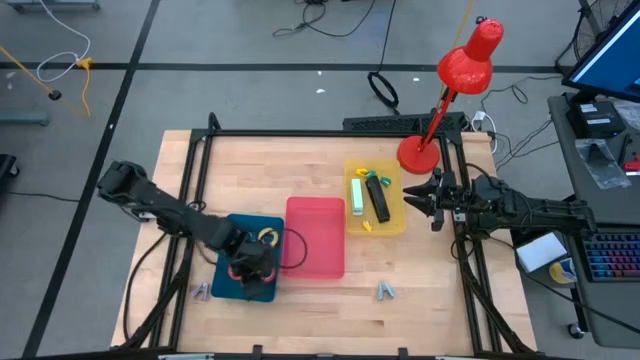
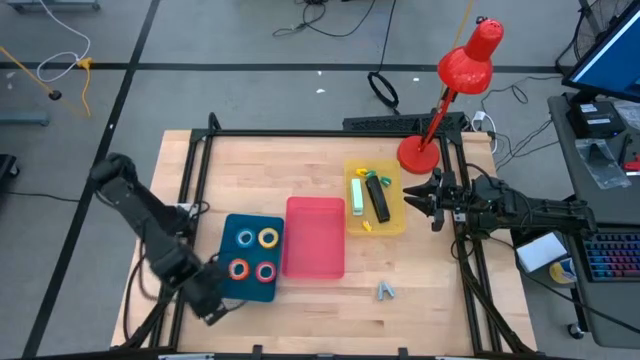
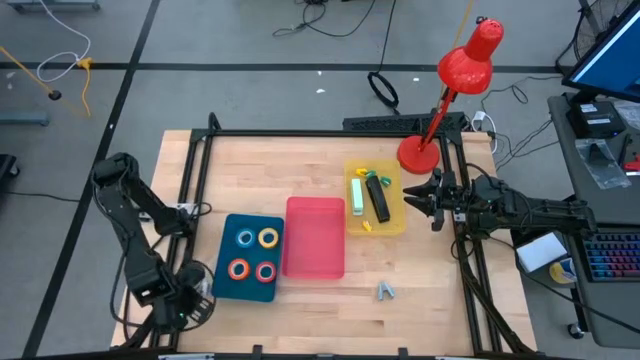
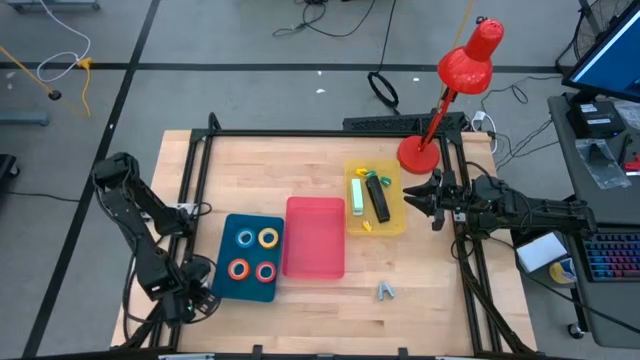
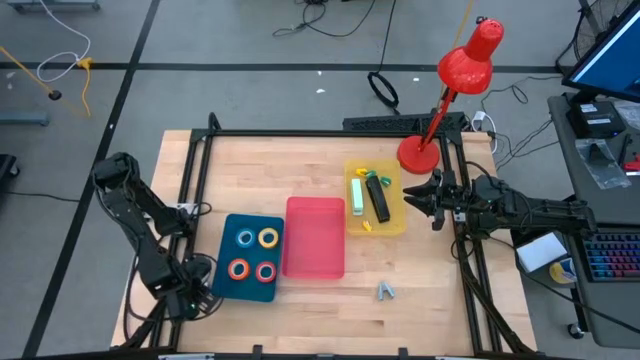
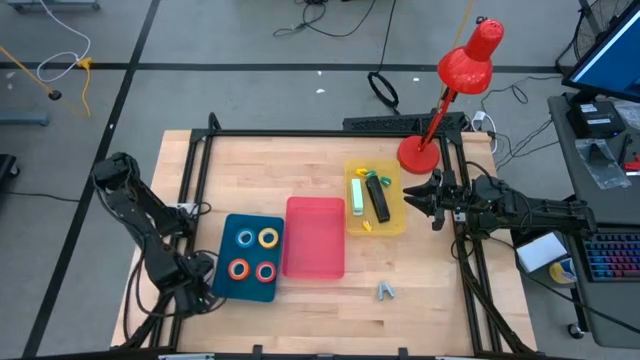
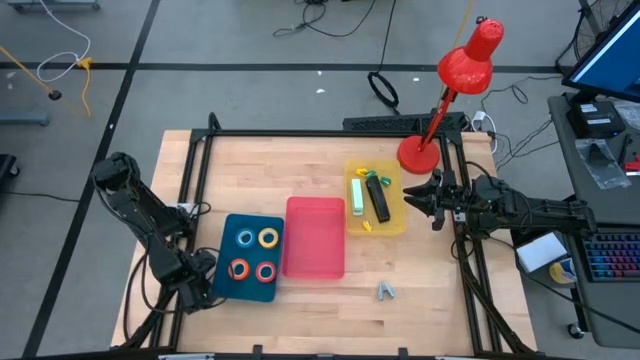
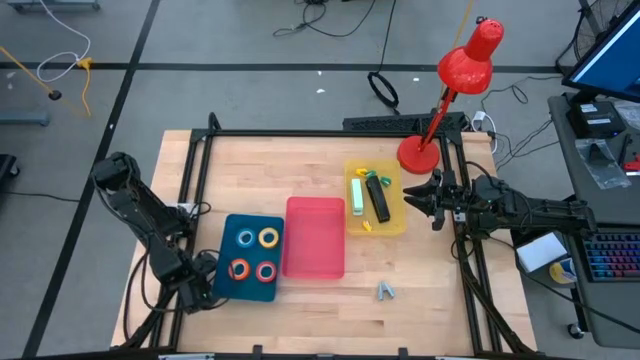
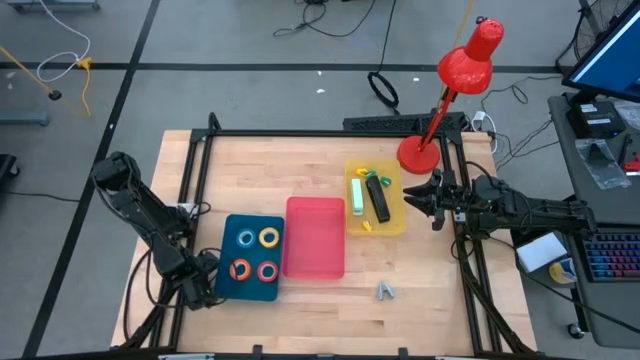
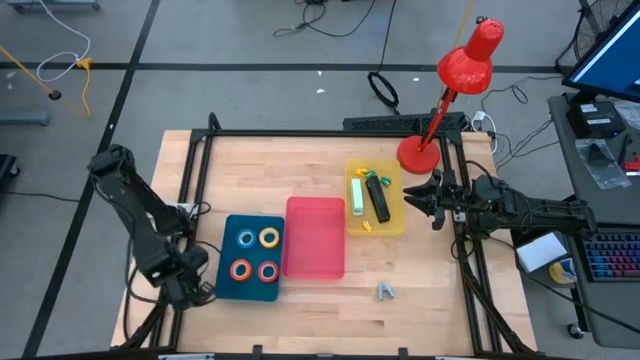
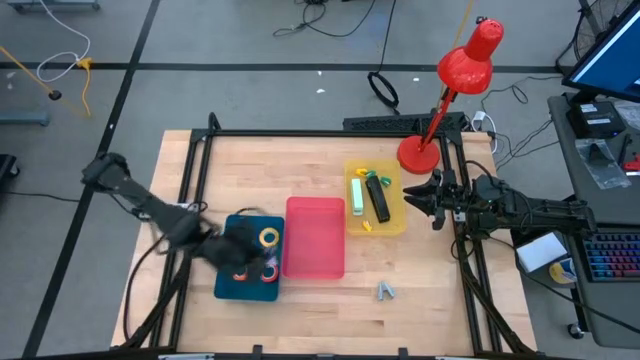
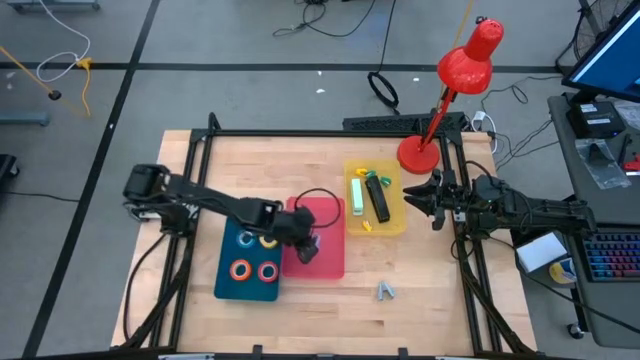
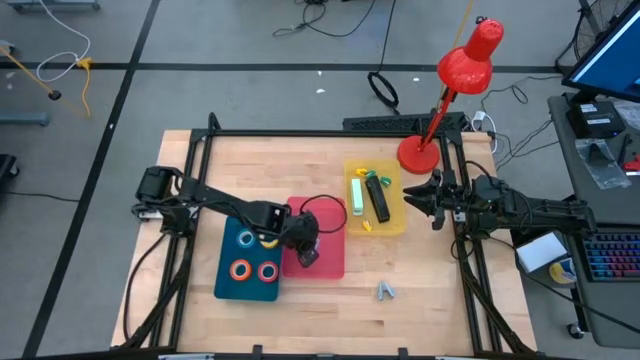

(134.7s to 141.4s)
Task: Pick and place Stapler, Stapler remover, tape
Put the violet staple remover into the red bin

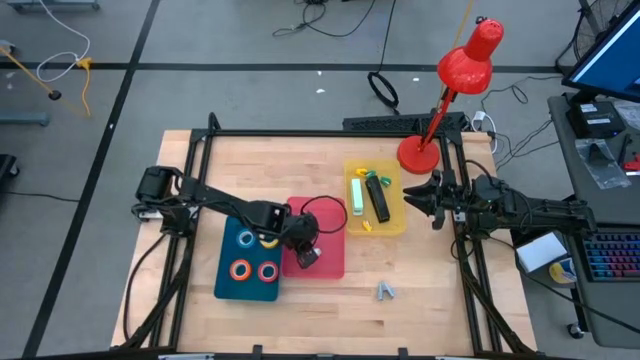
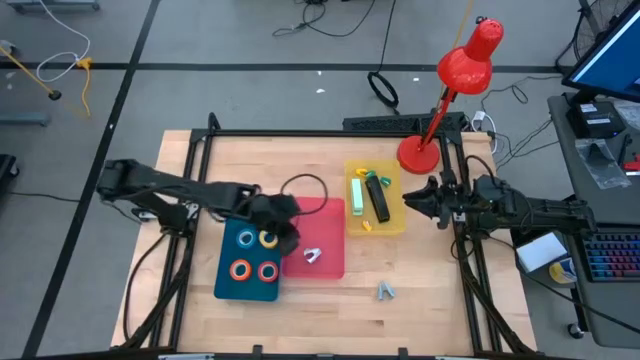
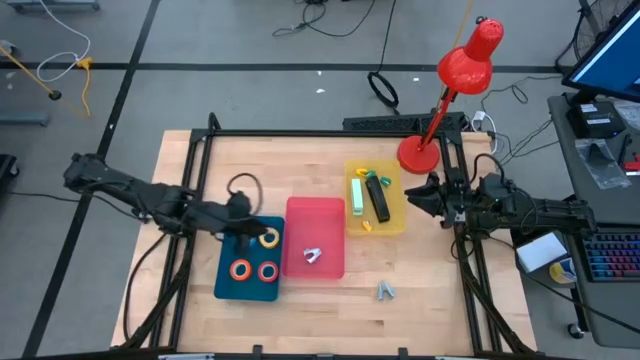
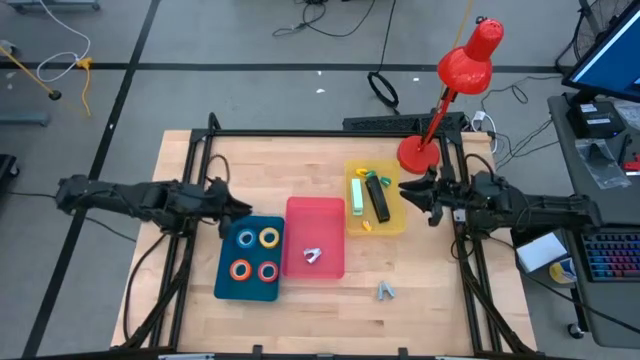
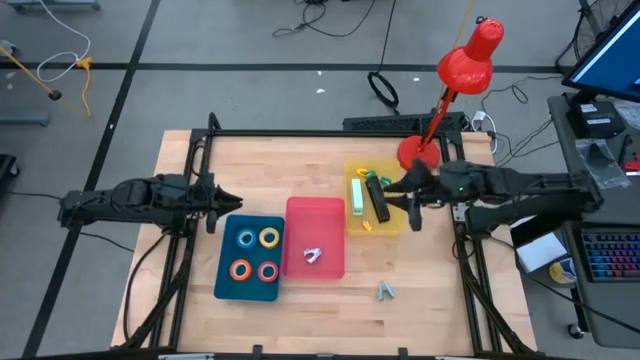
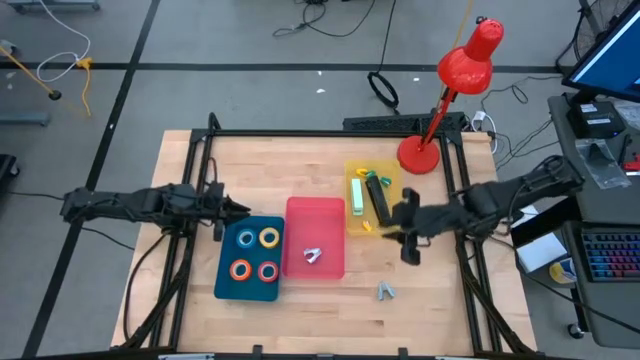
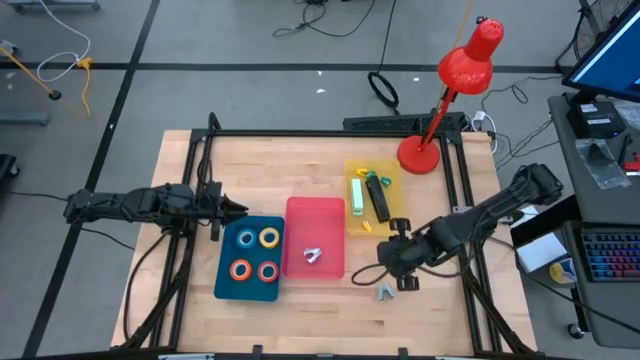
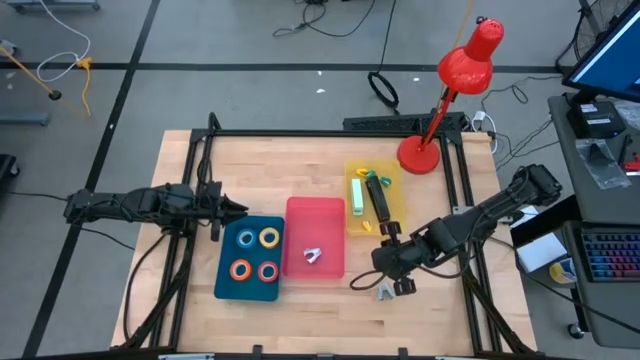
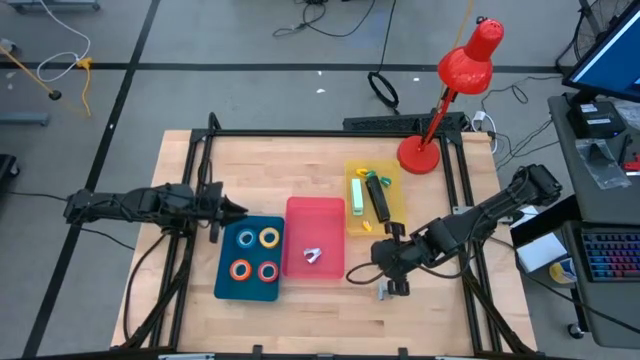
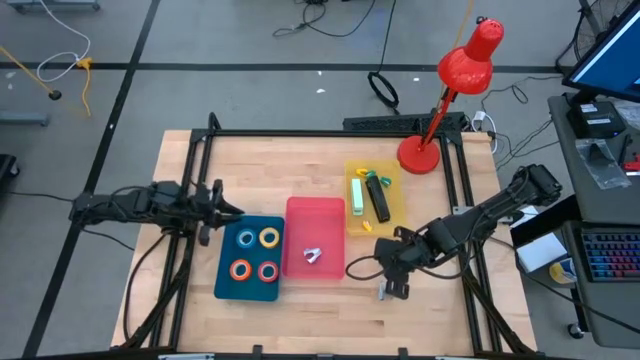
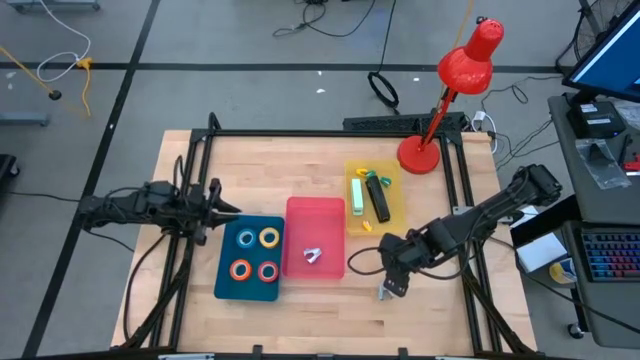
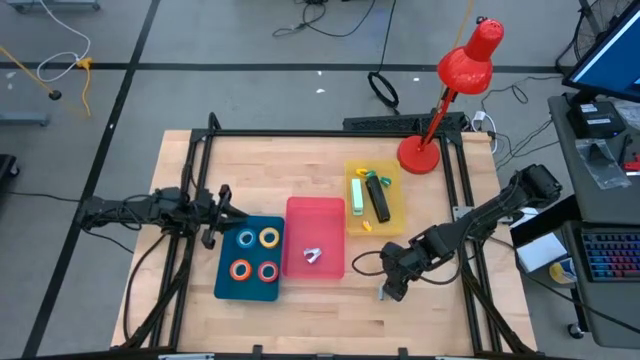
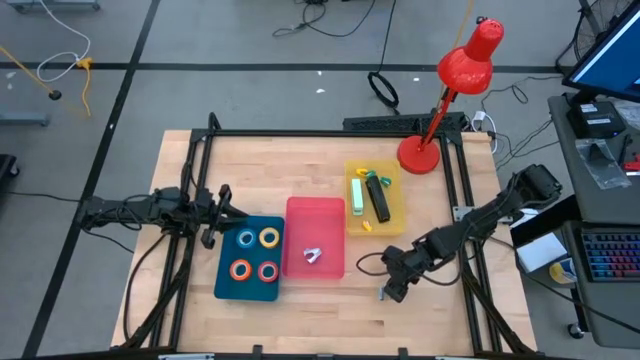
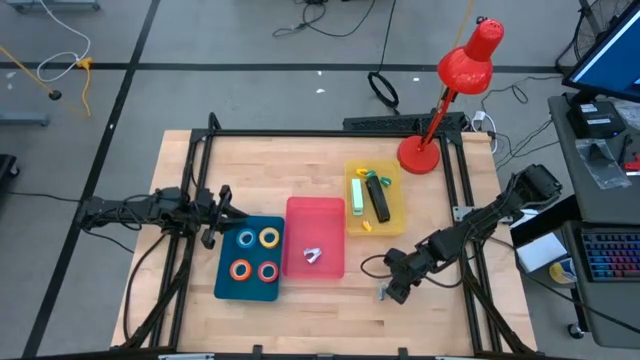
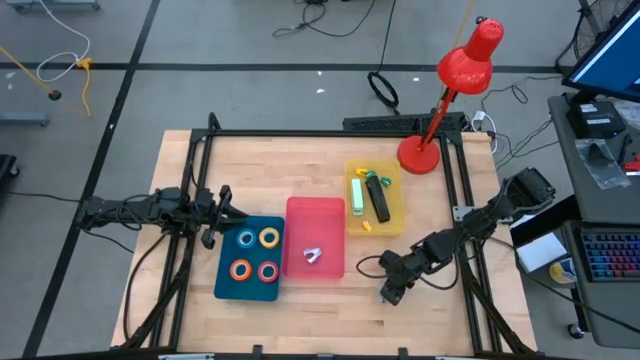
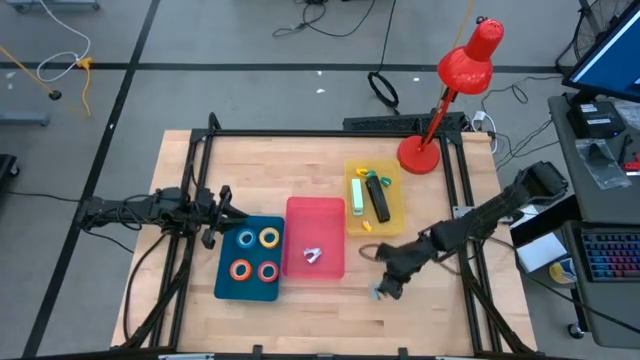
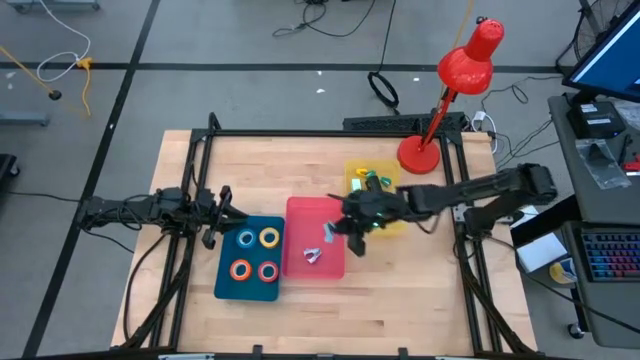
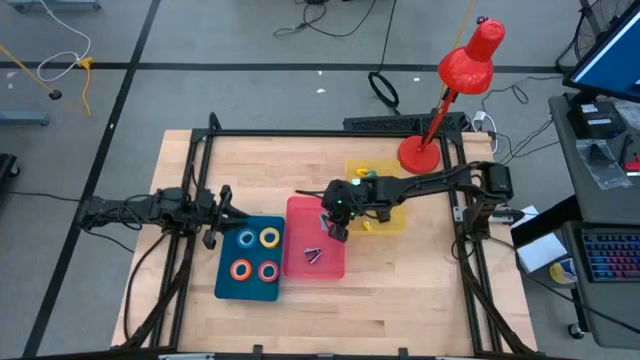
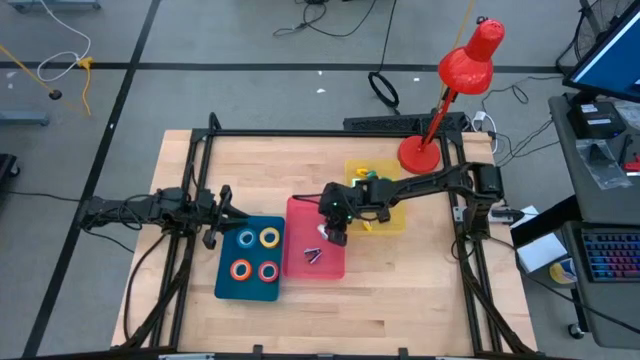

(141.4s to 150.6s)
Put the blue staple remover into the red bin

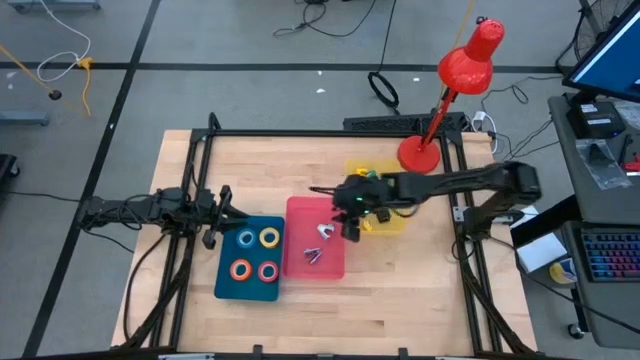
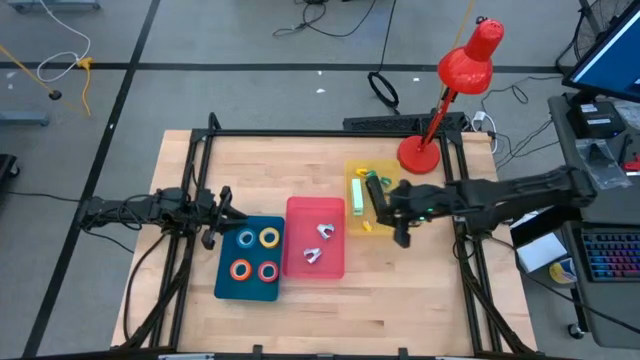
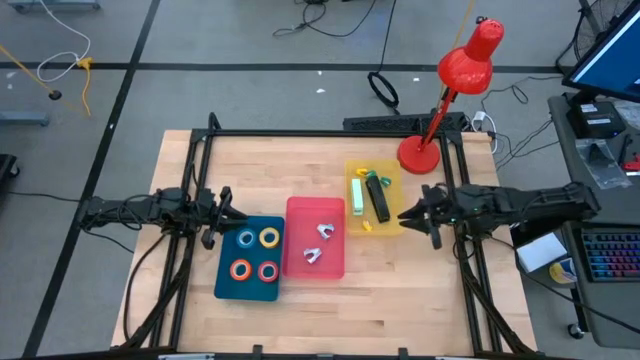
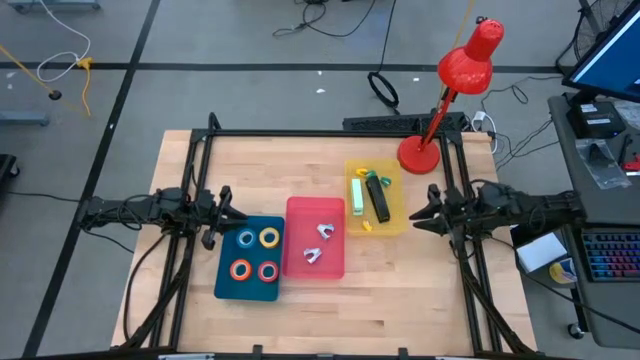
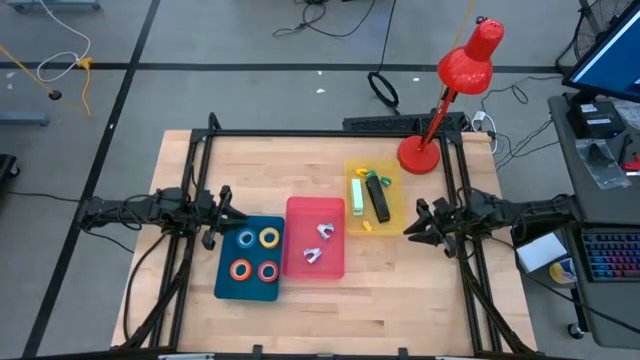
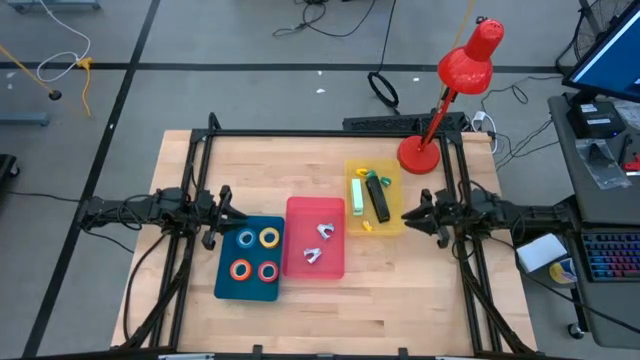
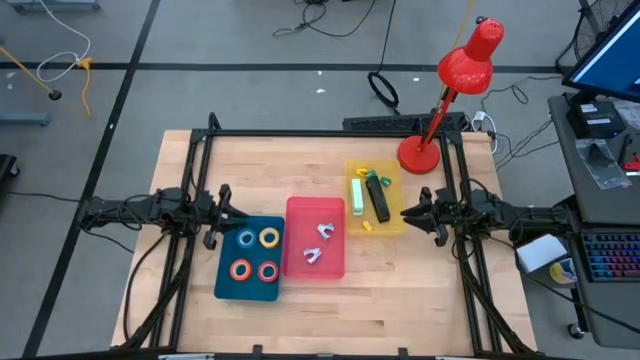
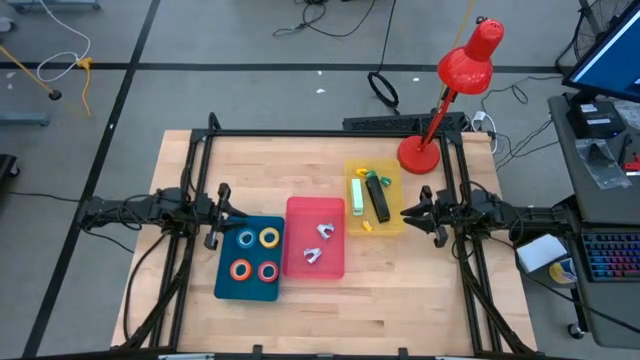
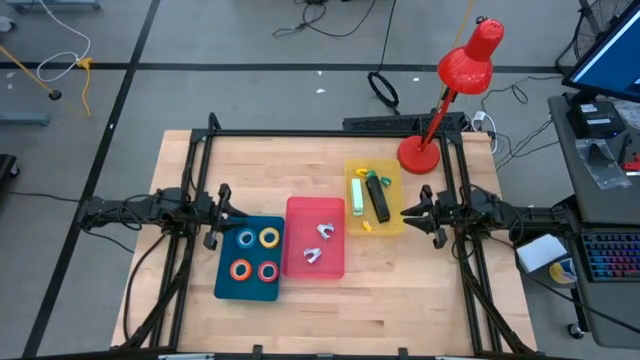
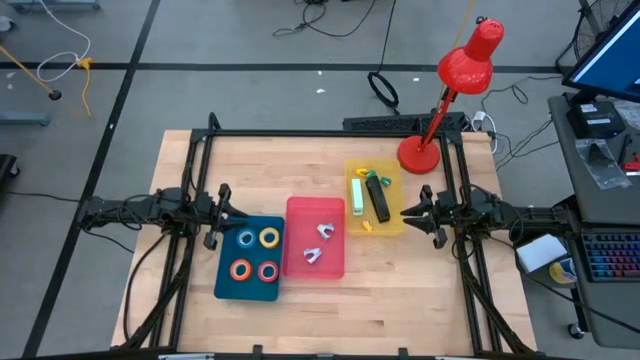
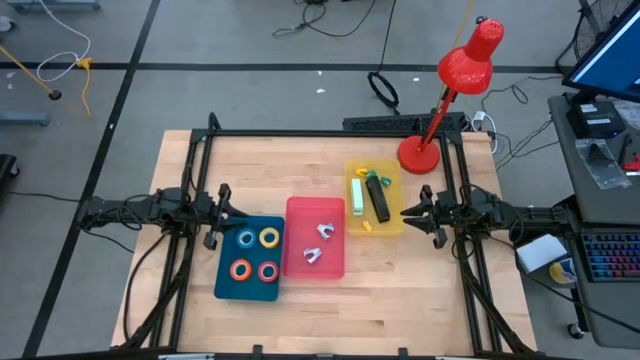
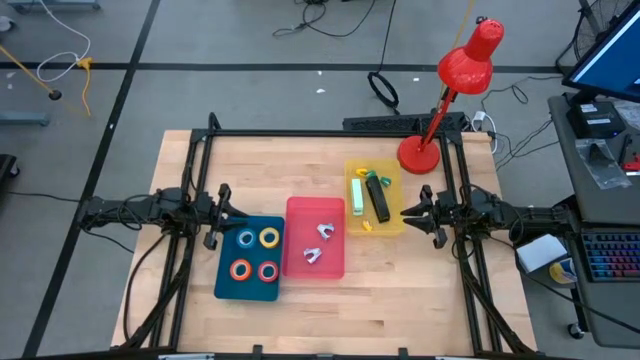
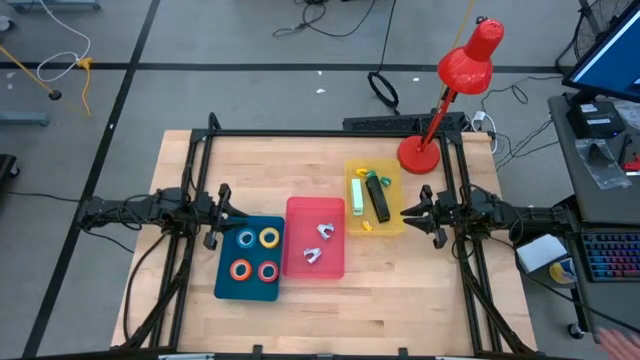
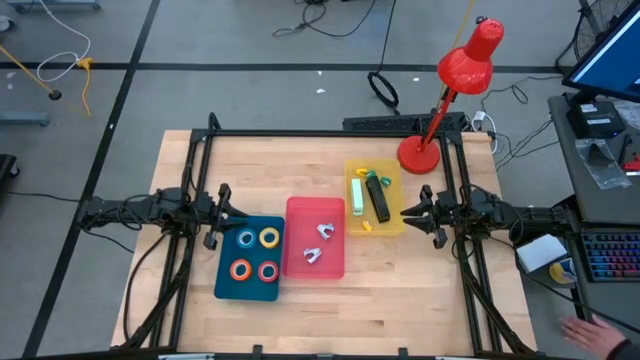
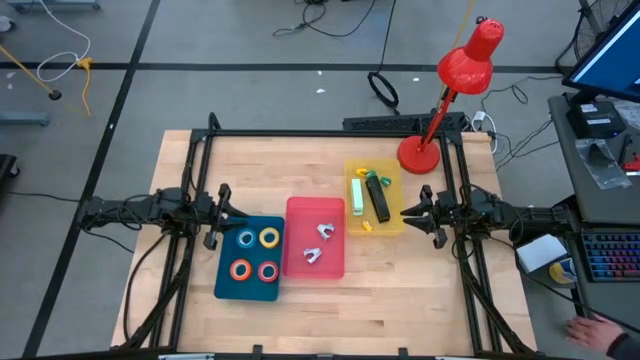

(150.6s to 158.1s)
Return to Home Position
